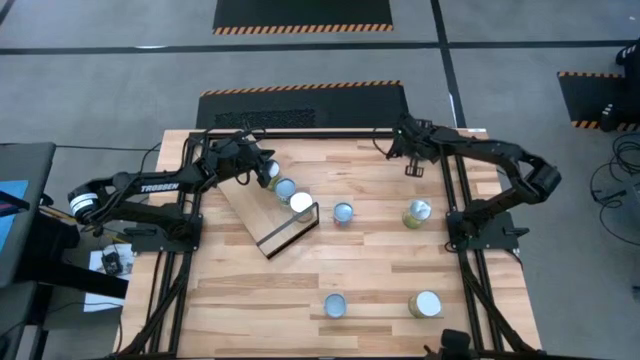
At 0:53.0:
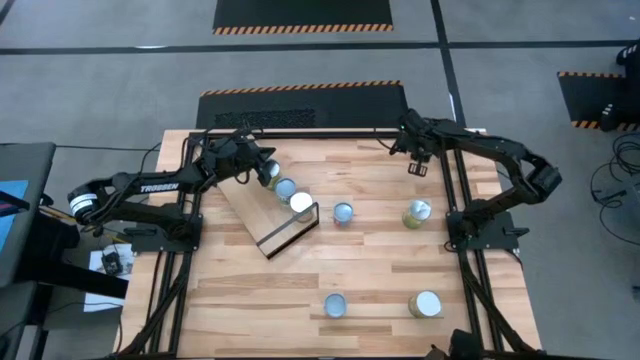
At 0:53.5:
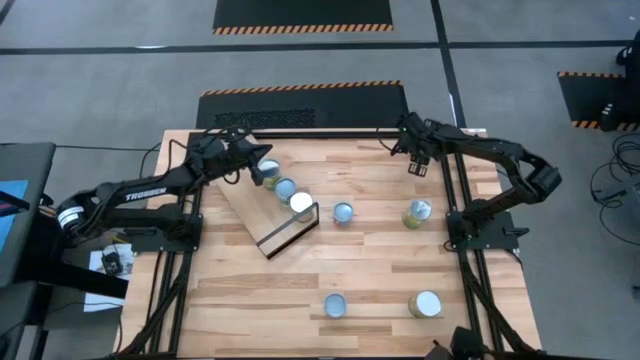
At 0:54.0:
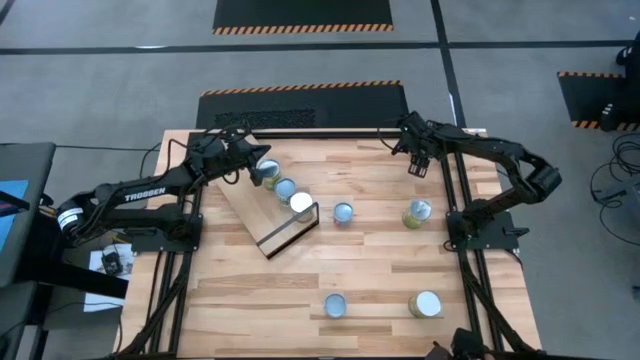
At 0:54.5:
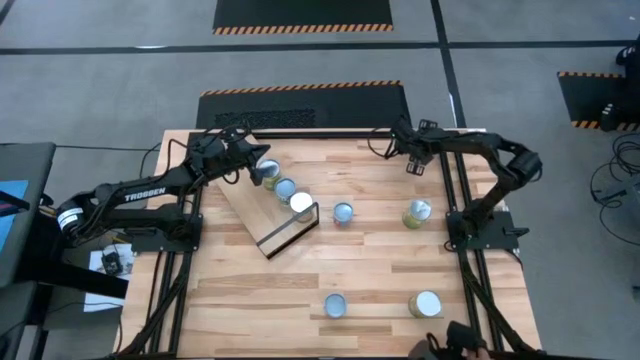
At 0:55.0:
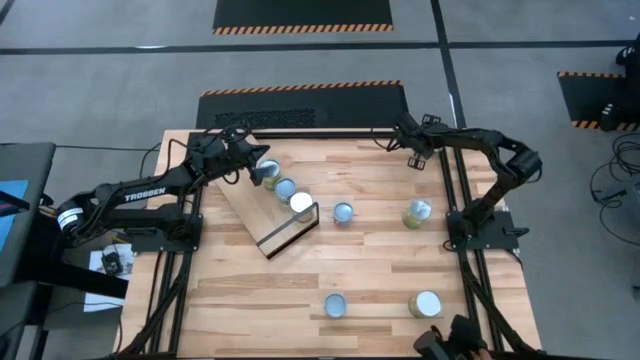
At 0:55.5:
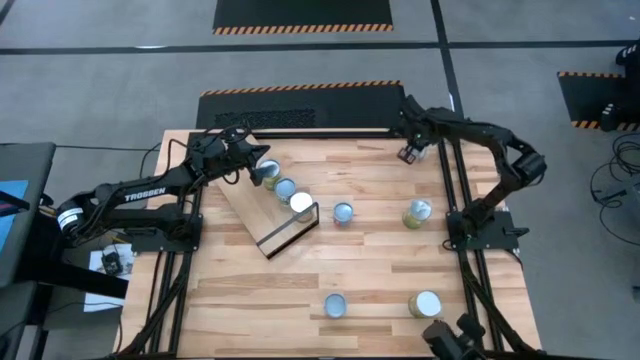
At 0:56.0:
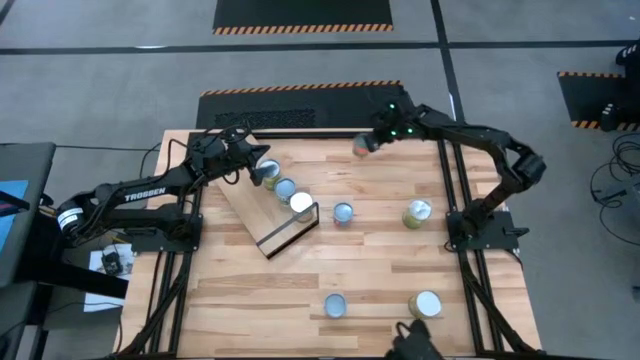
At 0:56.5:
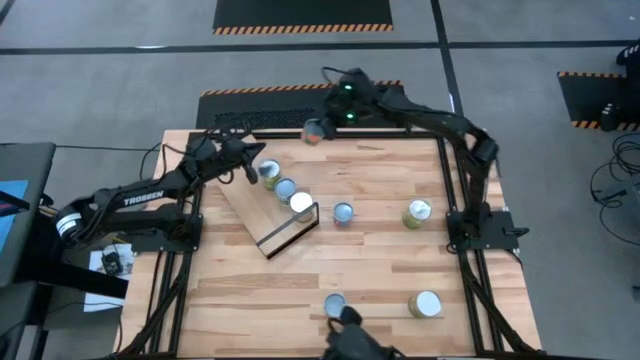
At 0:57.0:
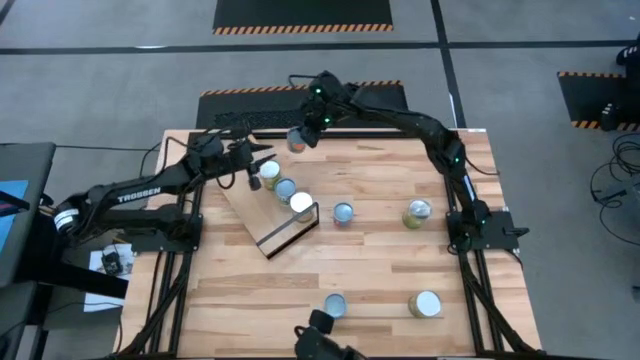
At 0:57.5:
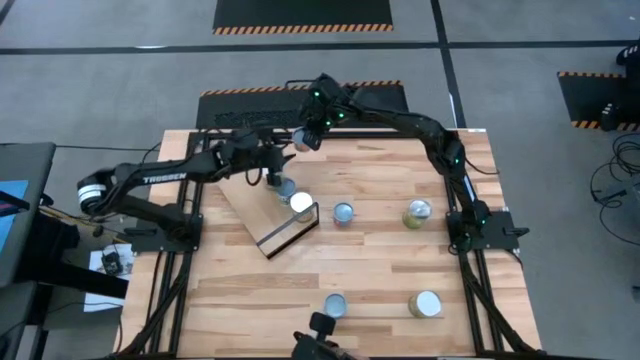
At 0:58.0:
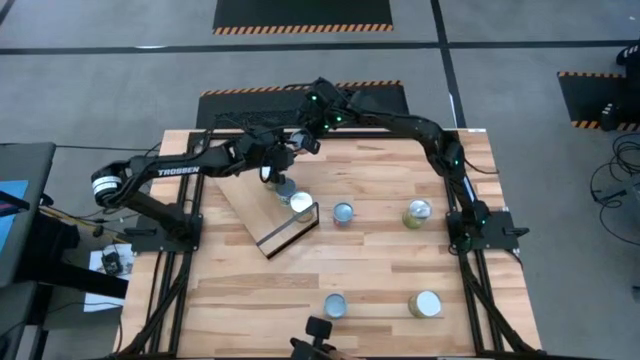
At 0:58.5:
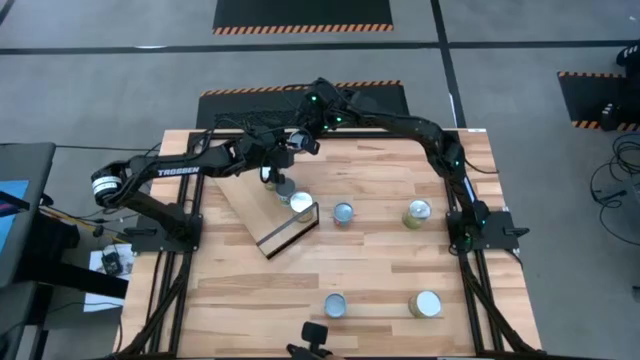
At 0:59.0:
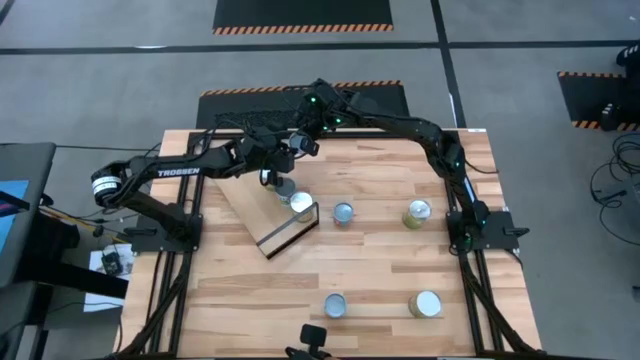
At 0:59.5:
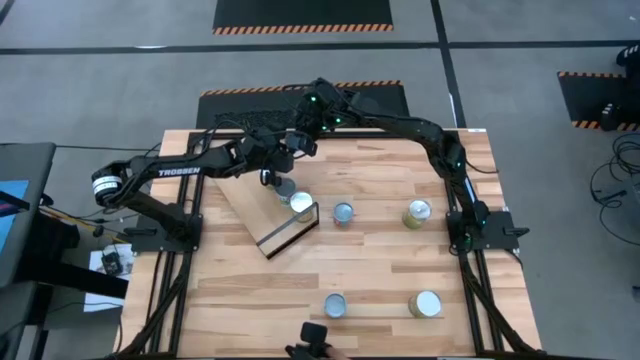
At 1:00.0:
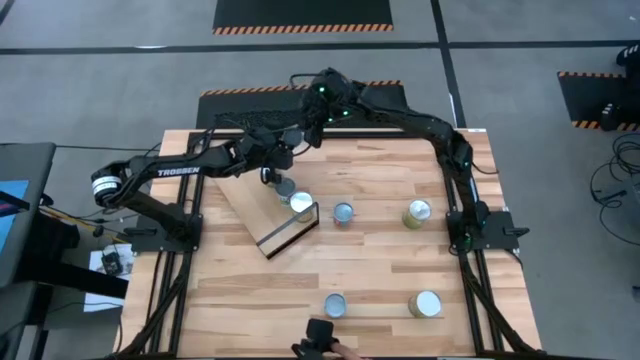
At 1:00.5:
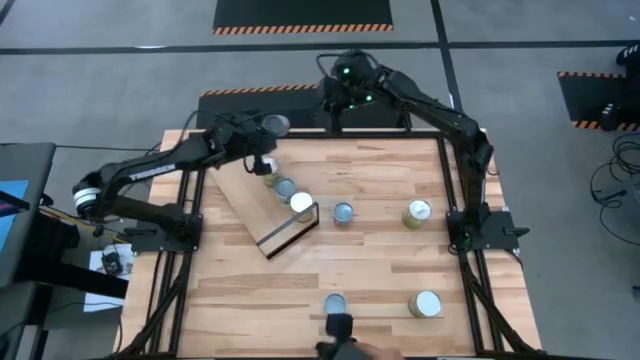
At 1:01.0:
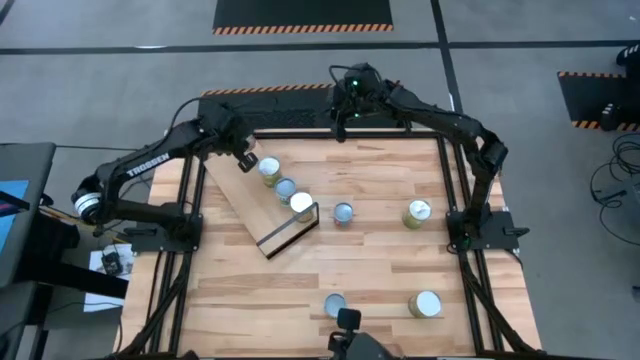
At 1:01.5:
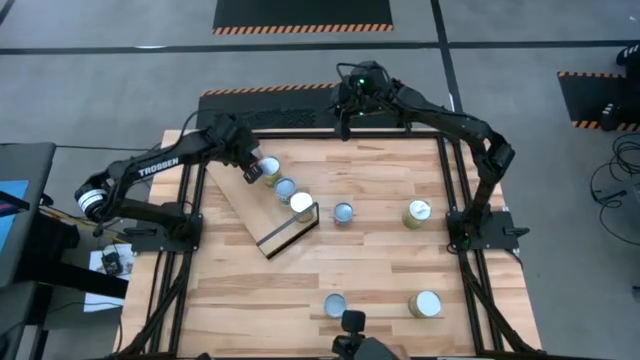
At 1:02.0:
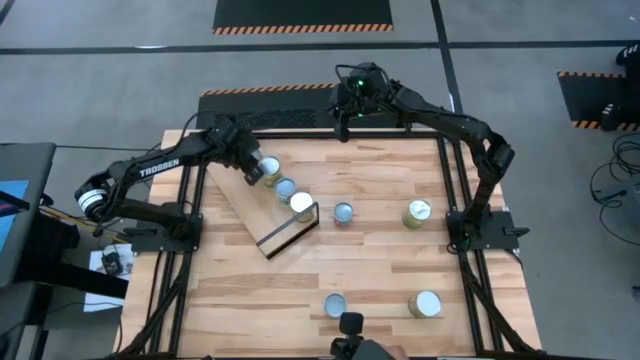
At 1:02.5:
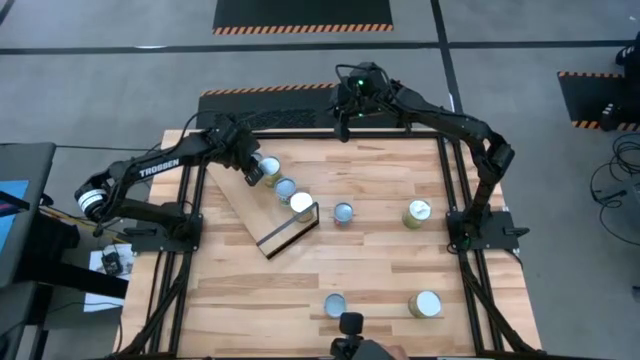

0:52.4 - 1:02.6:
Task: Pick and place cans onto a shelf
Put the small canned oranges on the shelf

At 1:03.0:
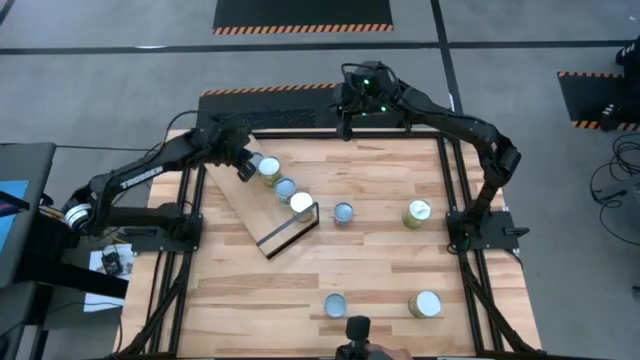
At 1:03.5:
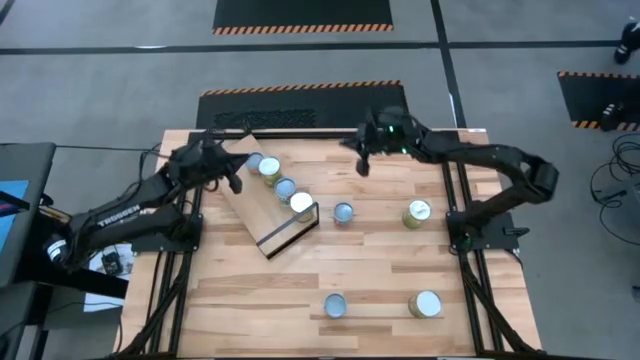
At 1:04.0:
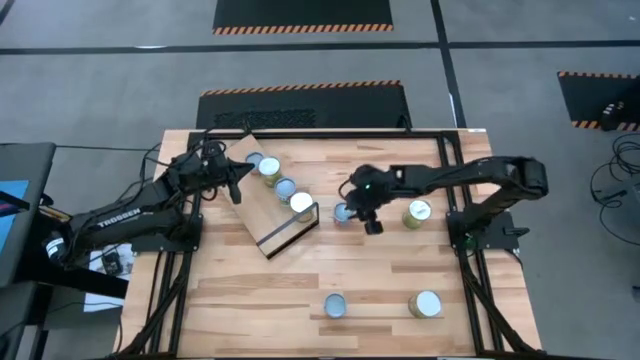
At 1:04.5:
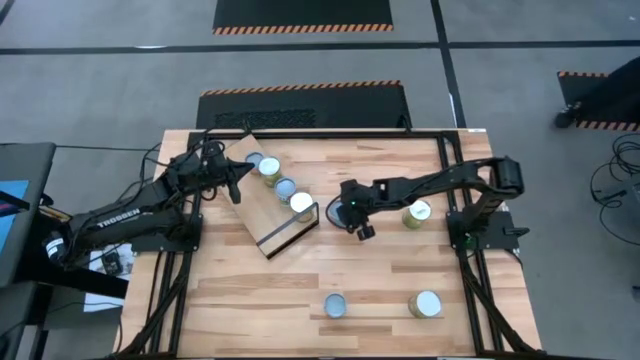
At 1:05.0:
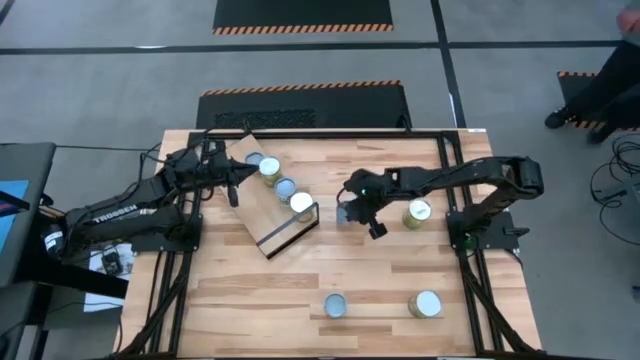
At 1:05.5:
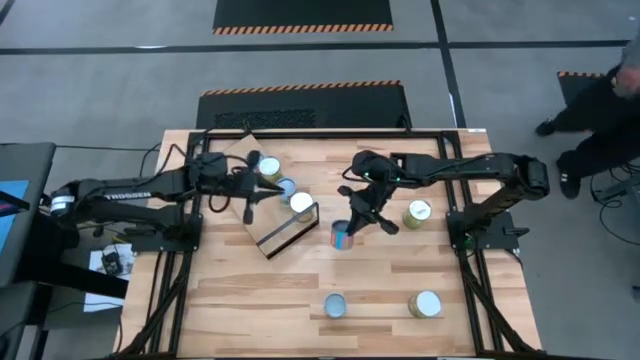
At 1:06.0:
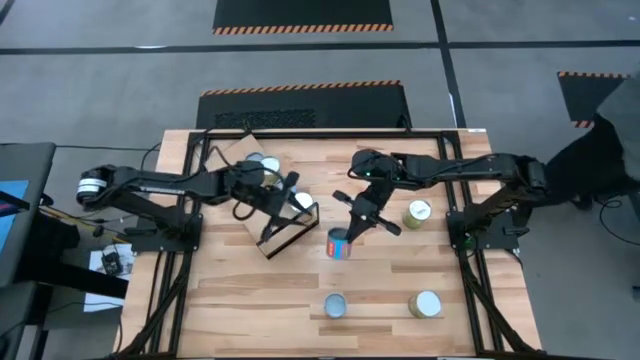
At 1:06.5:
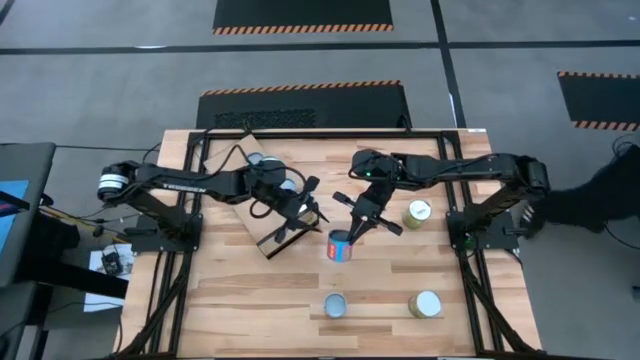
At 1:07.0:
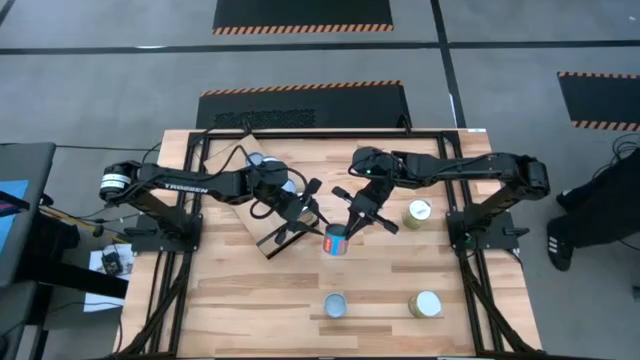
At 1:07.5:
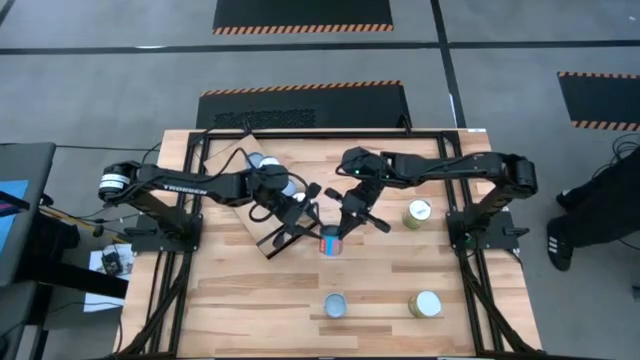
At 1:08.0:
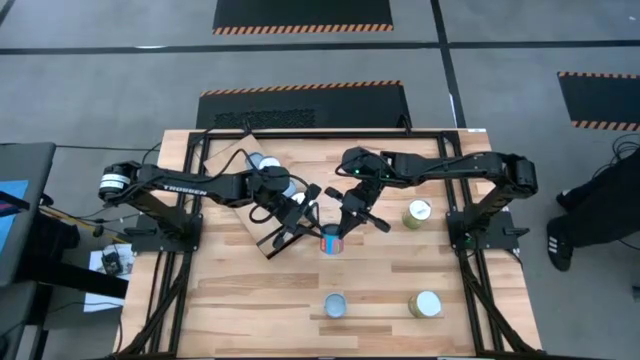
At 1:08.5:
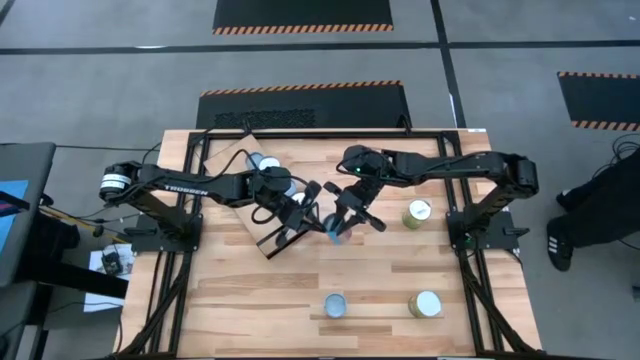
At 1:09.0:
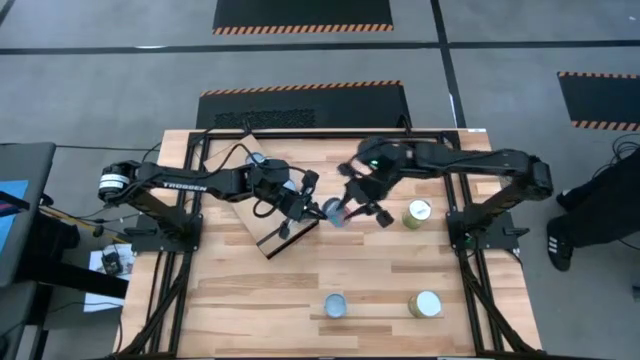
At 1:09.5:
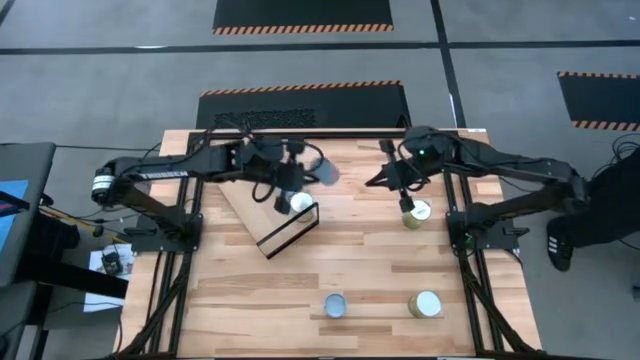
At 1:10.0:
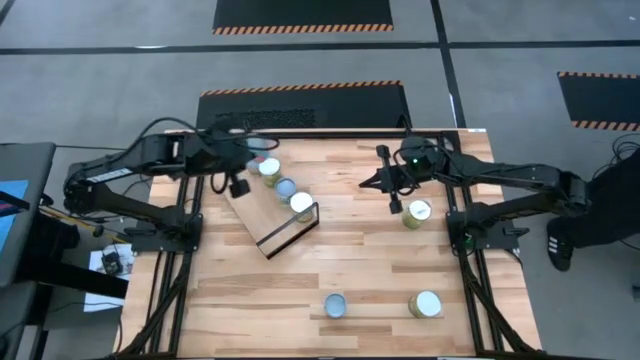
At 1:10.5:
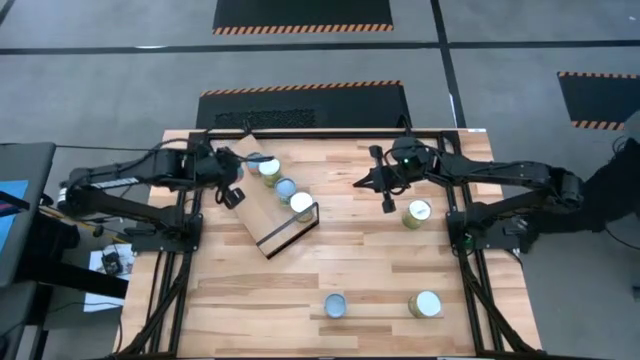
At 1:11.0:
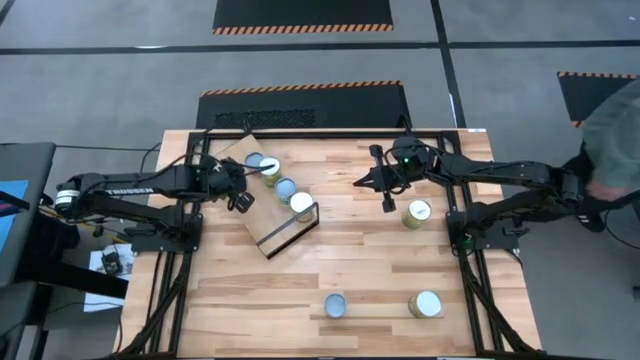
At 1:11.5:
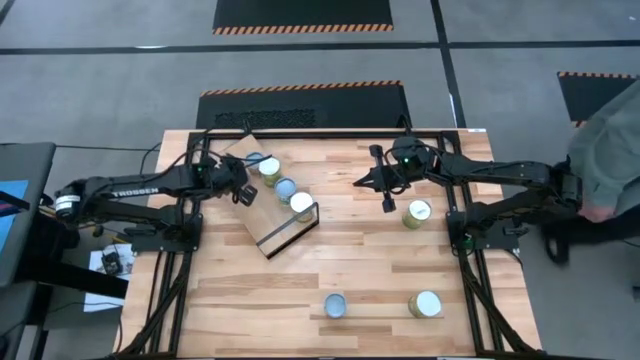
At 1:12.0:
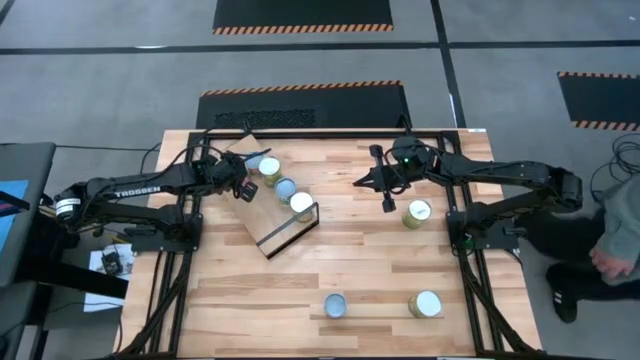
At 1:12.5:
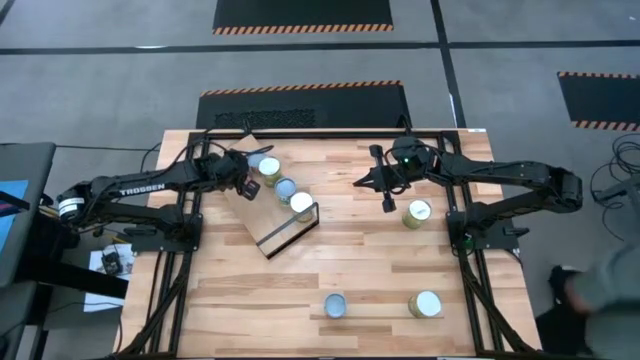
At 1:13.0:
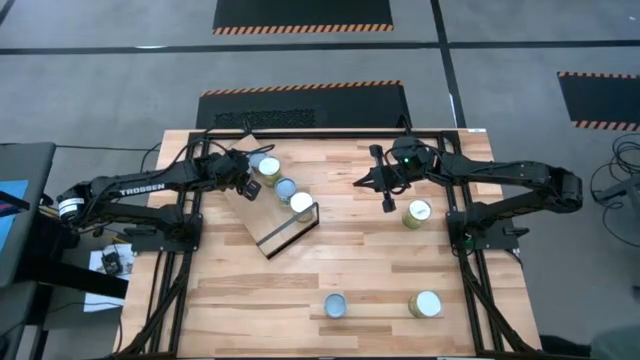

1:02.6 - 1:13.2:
Put the canned corn on the shelf
